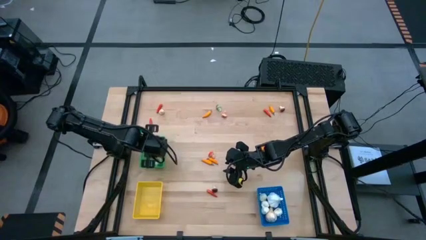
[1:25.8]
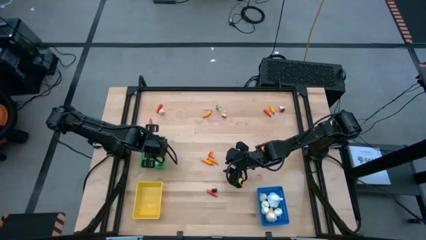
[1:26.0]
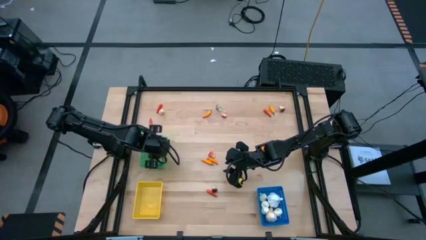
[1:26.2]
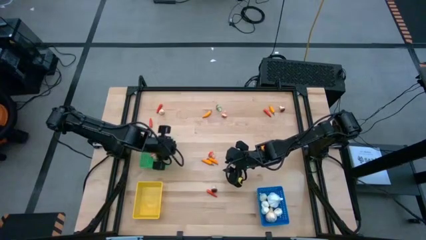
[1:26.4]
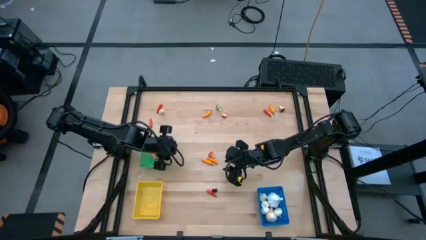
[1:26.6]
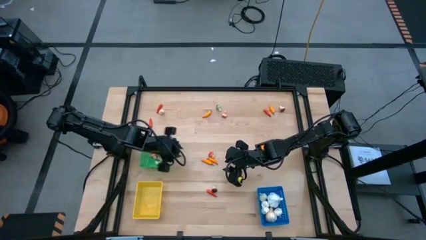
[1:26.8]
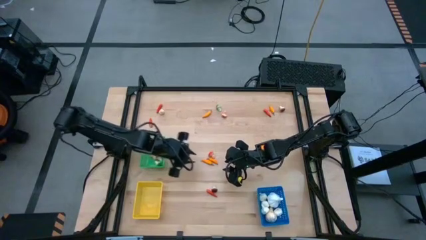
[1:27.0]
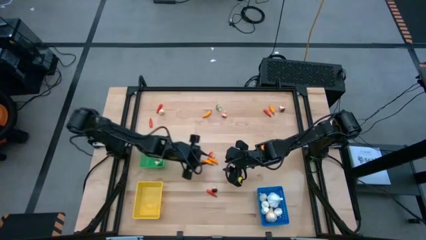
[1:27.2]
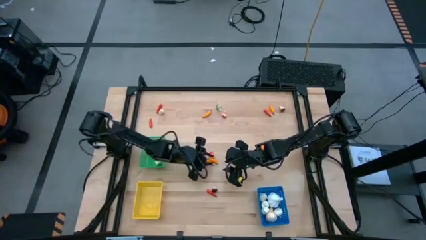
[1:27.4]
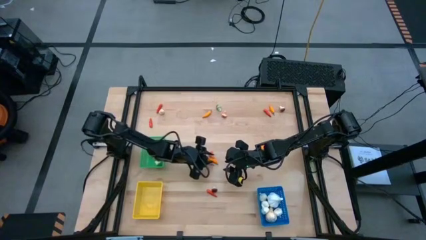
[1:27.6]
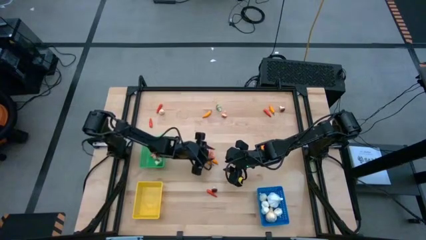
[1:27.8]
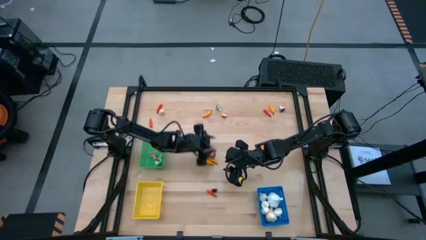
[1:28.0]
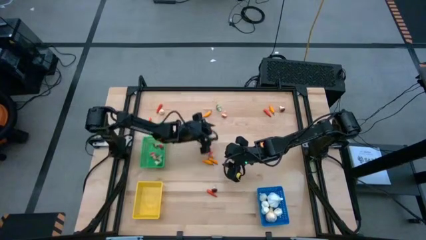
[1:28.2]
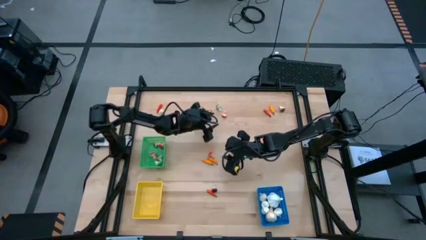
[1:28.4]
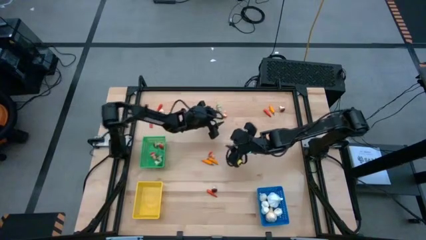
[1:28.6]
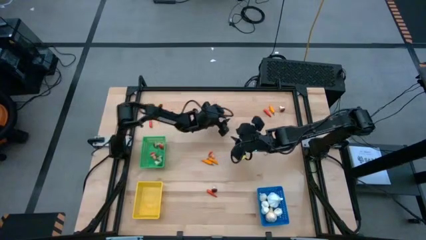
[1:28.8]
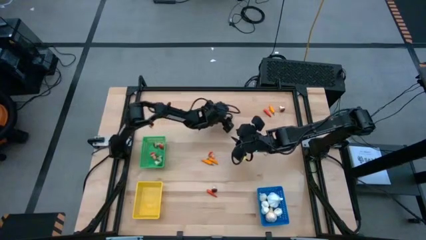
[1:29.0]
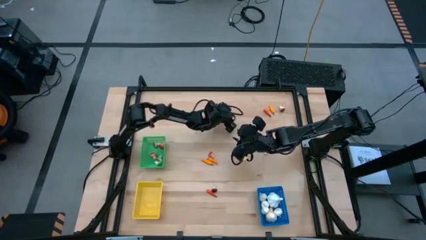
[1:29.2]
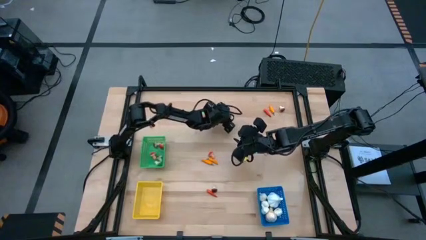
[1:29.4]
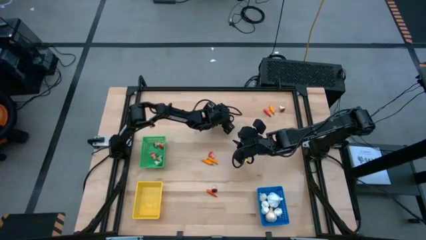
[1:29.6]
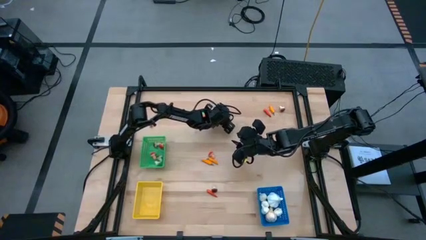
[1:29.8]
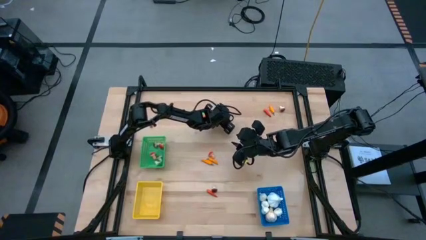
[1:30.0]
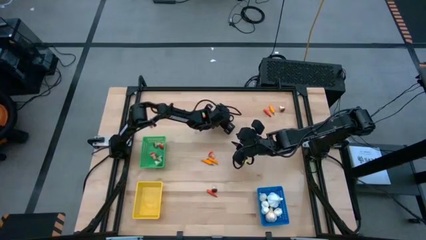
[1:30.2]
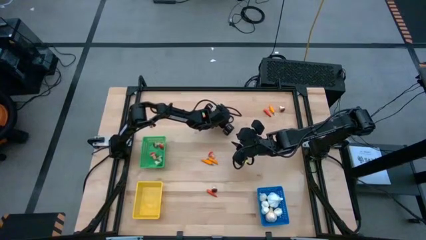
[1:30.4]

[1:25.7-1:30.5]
Task: Sort produce into baskets
Put the red mushroom into the green bin

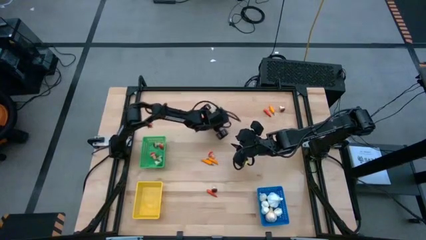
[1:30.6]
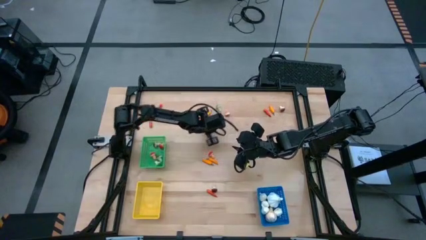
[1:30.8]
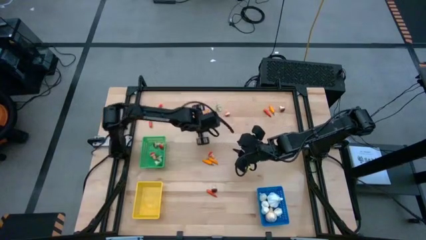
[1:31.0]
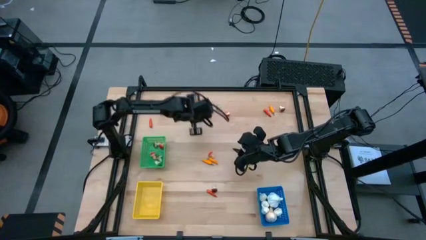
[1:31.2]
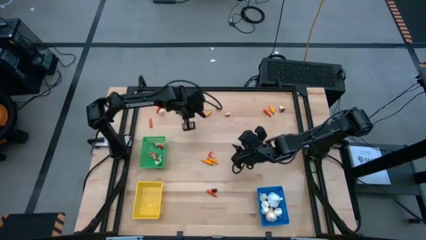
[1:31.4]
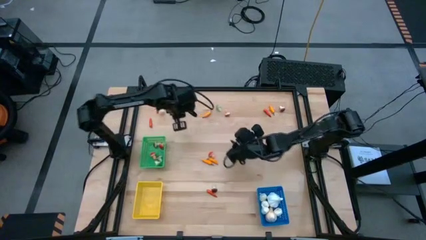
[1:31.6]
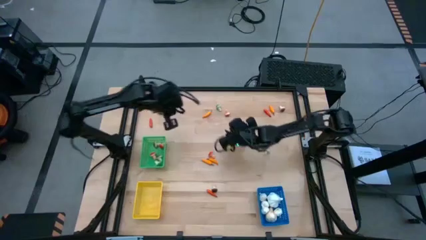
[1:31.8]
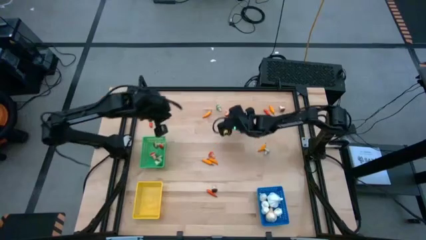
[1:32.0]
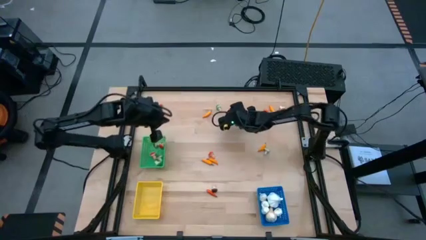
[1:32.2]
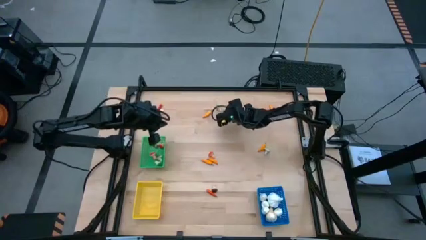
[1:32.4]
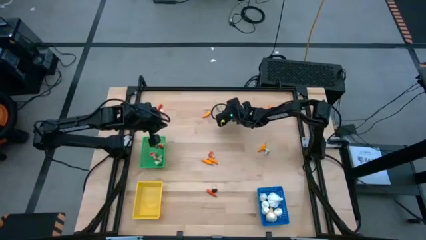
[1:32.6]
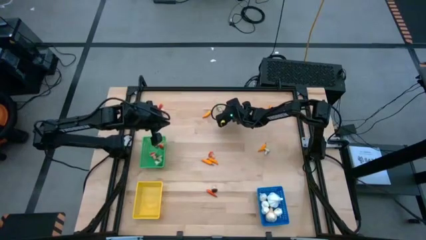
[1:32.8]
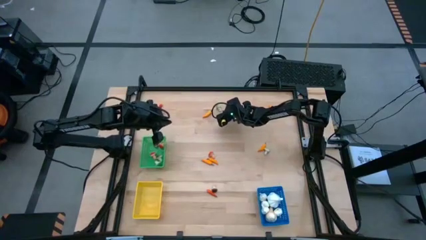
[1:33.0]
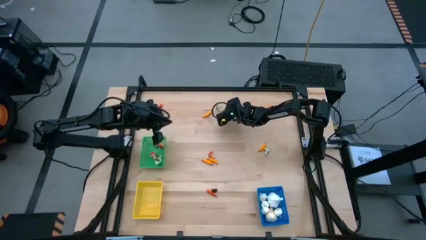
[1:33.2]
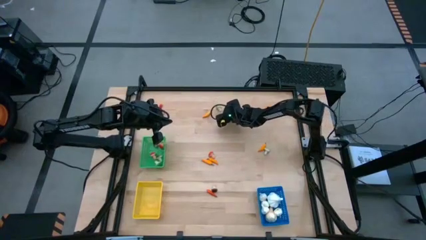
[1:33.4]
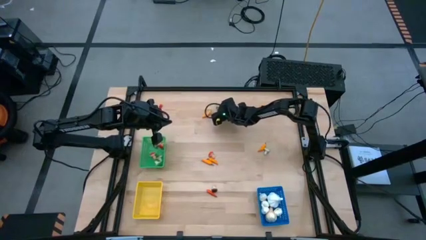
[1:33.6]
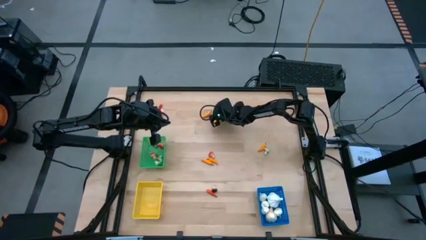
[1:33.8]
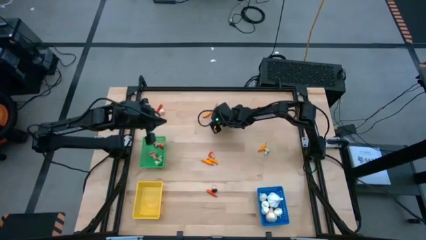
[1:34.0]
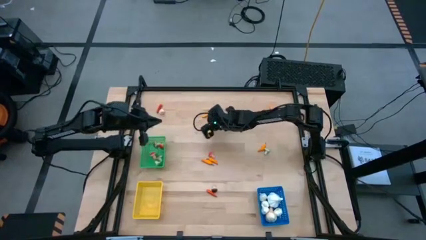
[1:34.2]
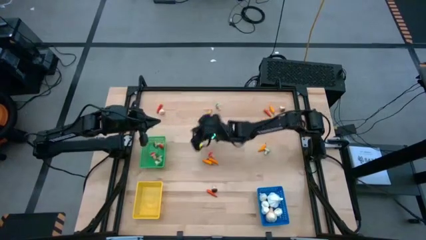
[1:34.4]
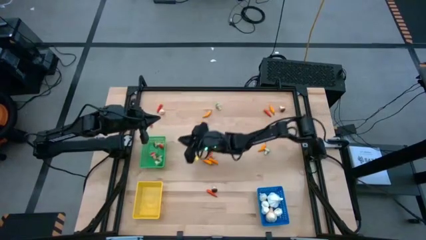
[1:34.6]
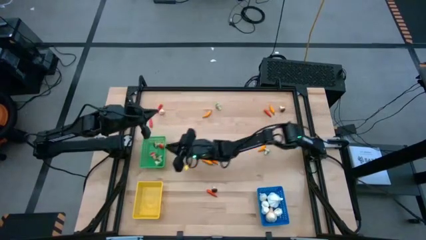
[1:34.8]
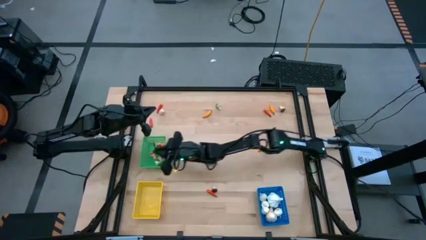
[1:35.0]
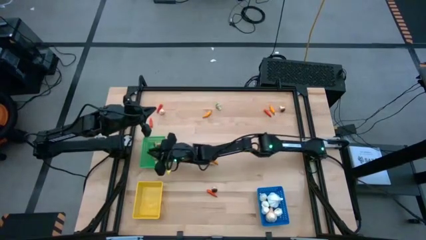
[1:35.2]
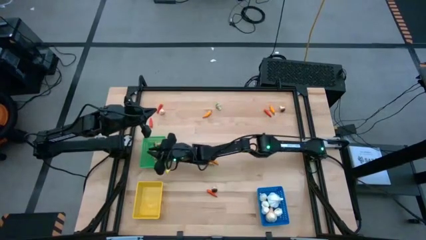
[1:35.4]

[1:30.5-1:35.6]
Put the red mushroom into the green bin

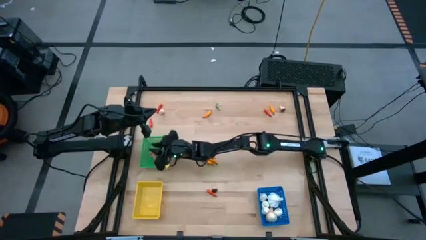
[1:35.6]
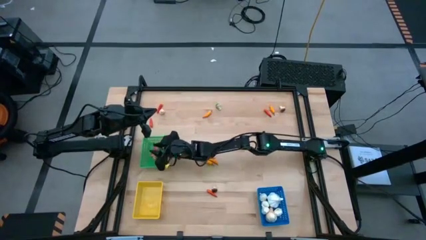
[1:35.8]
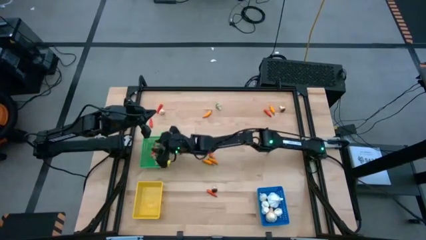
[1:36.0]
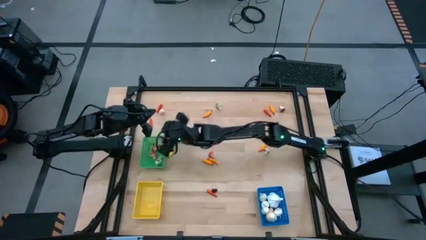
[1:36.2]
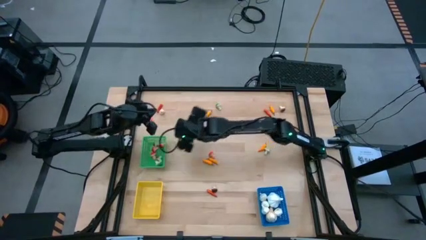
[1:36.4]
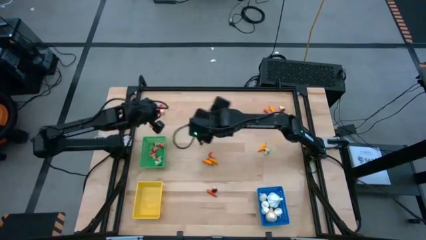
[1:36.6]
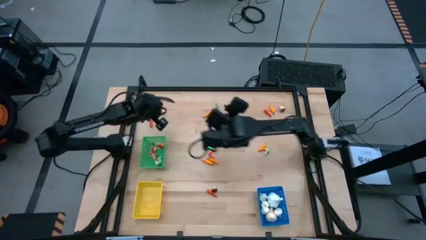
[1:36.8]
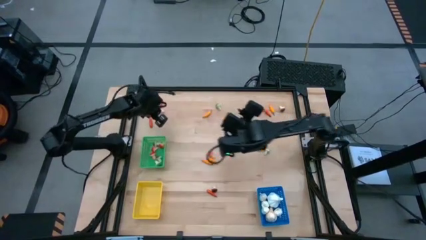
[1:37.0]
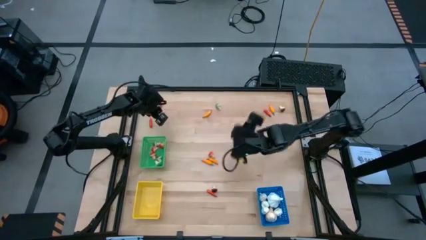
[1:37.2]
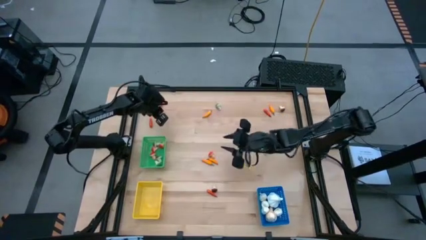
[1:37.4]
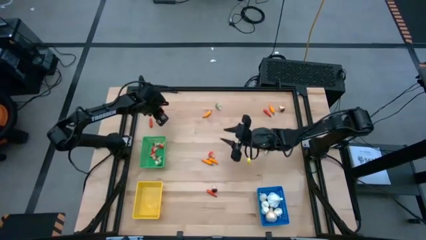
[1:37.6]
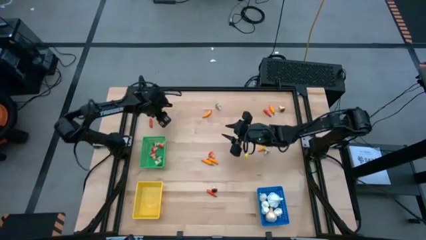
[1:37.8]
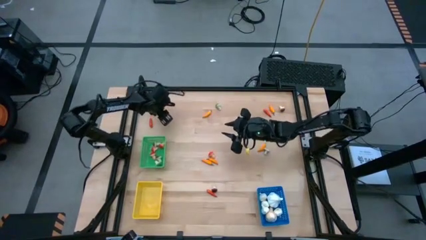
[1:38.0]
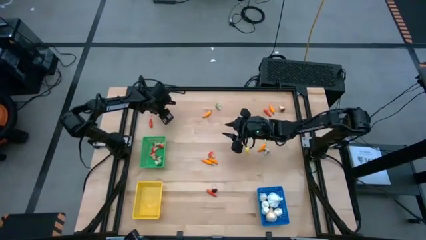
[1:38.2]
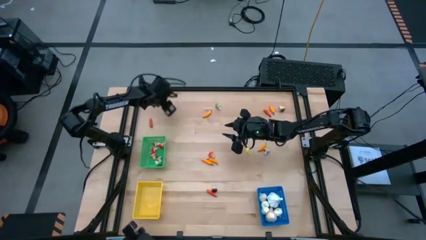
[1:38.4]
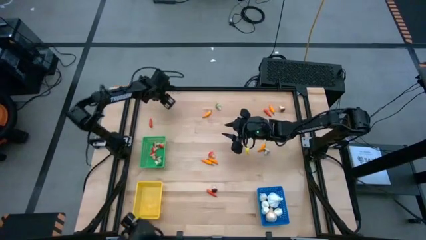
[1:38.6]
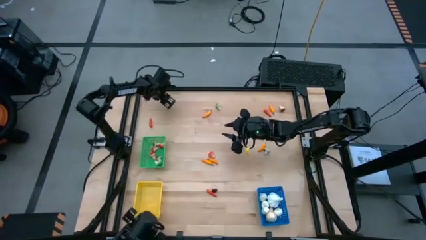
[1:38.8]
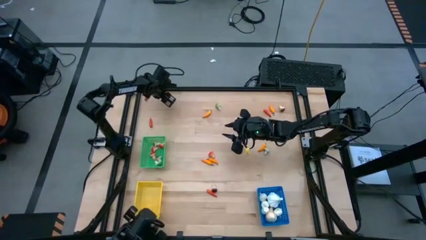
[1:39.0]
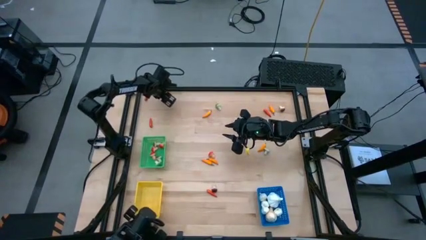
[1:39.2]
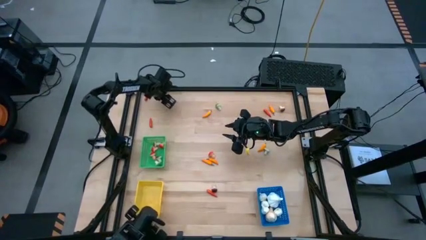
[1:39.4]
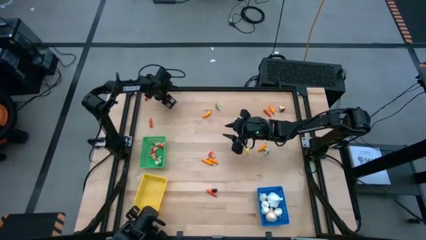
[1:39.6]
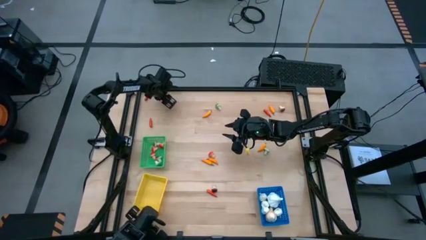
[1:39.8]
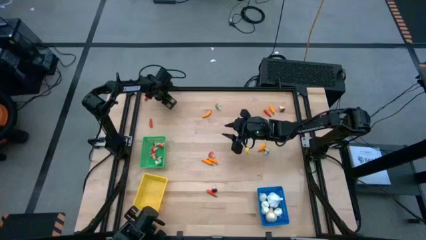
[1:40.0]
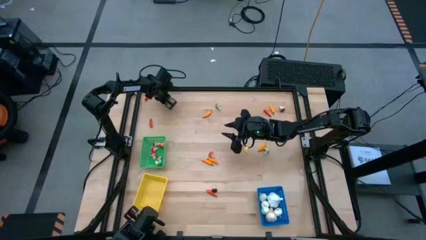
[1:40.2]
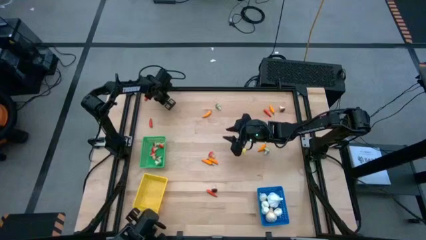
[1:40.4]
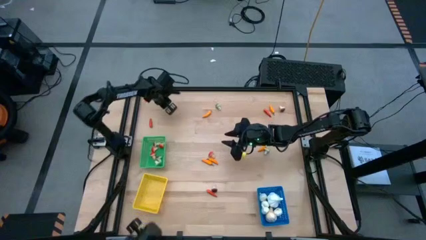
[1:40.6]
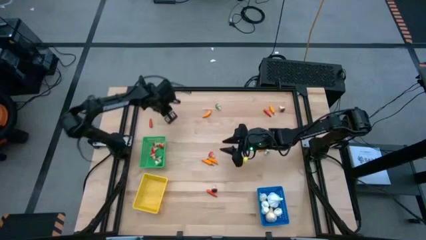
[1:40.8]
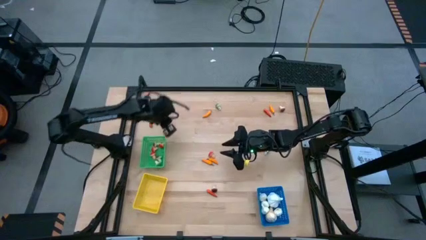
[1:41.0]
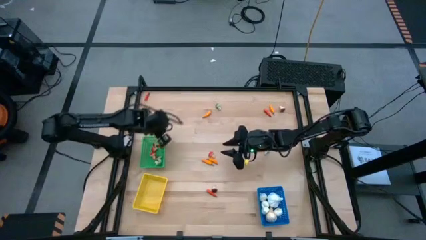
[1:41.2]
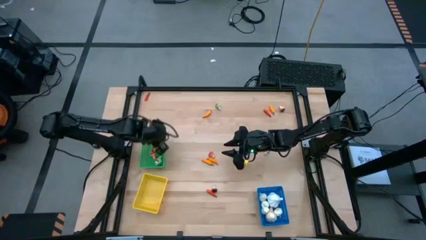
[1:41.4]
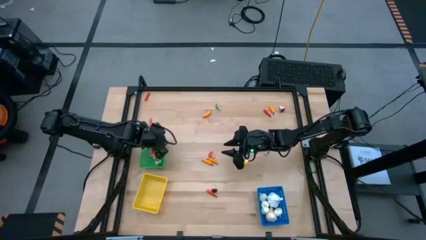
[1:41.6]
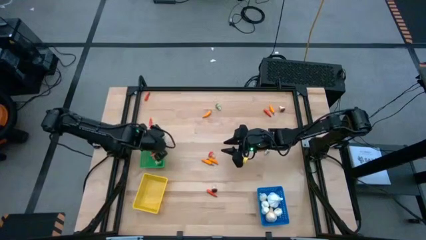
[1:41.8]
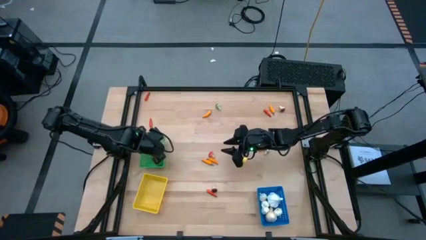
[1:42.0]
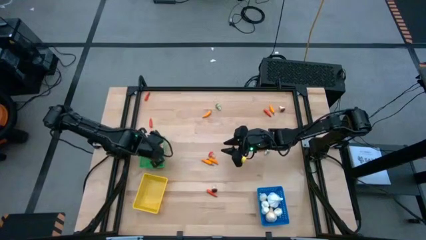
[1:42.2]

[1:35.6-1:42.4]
Put the red mushroom into the green bin
